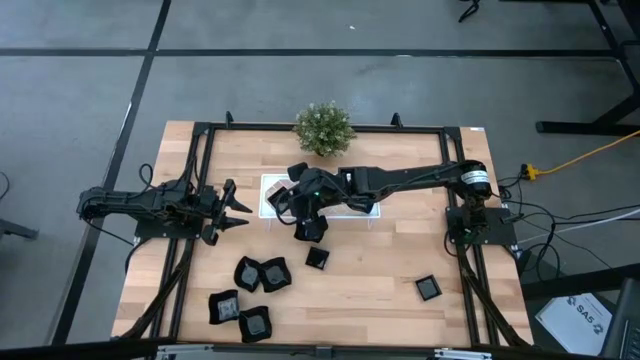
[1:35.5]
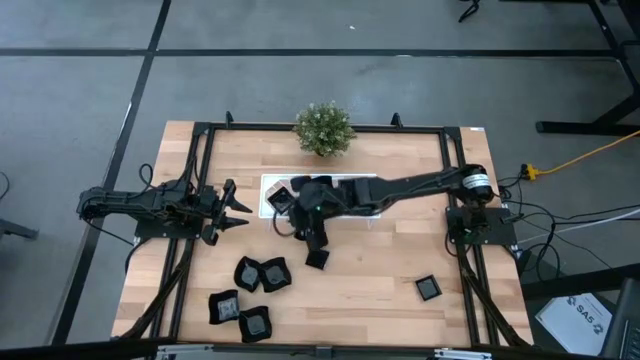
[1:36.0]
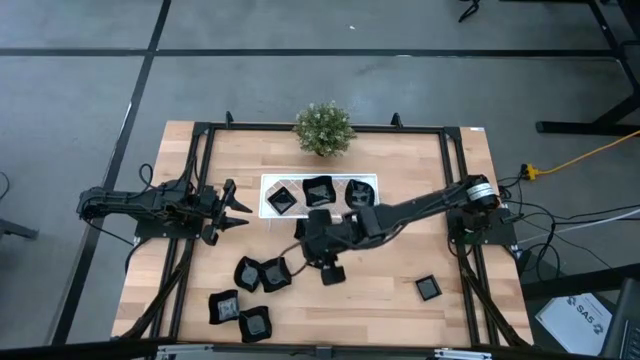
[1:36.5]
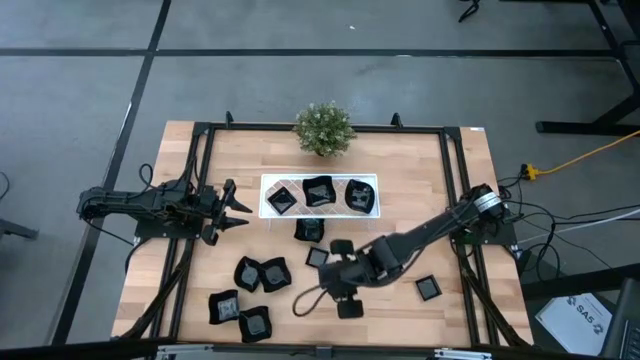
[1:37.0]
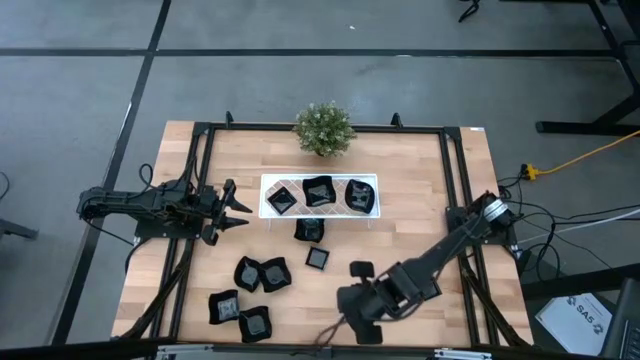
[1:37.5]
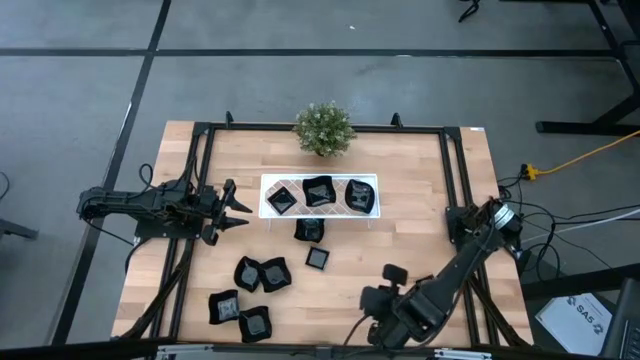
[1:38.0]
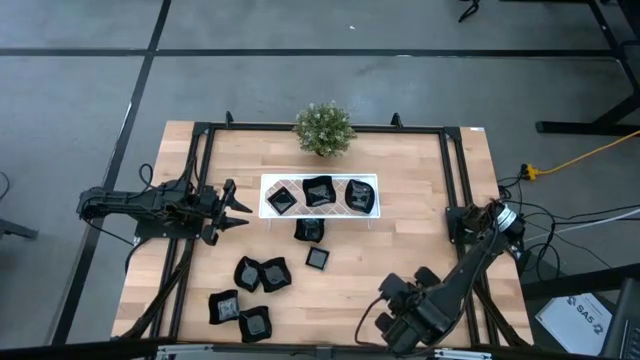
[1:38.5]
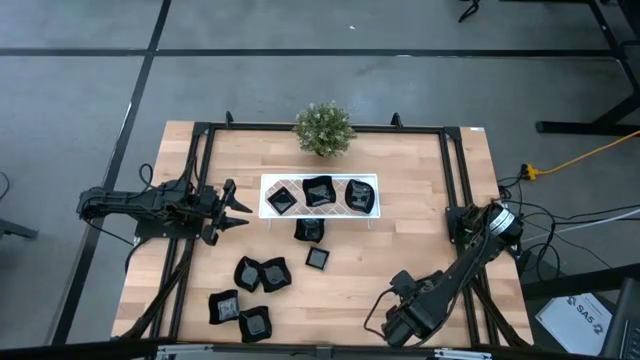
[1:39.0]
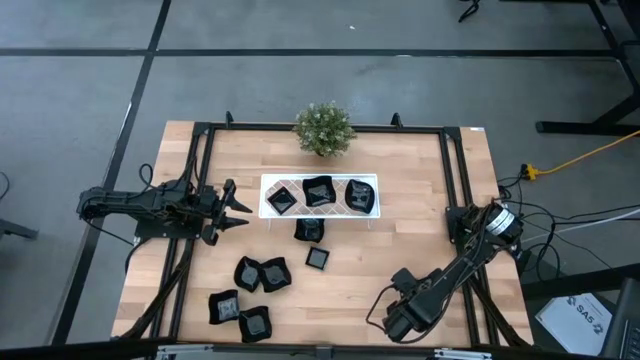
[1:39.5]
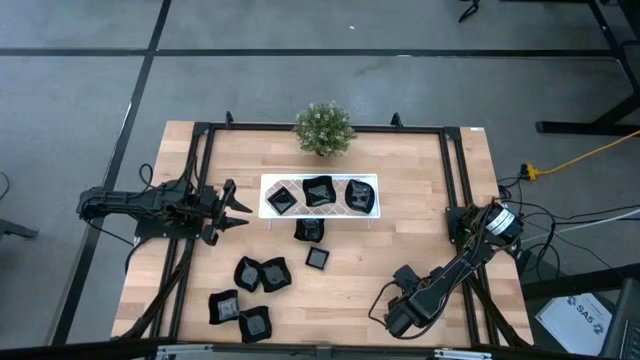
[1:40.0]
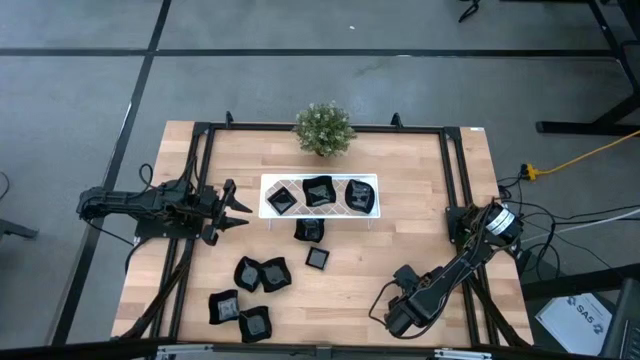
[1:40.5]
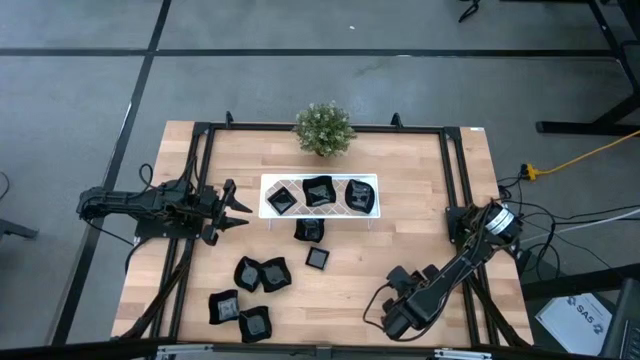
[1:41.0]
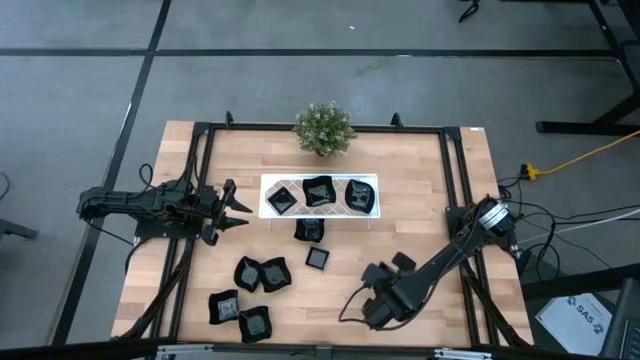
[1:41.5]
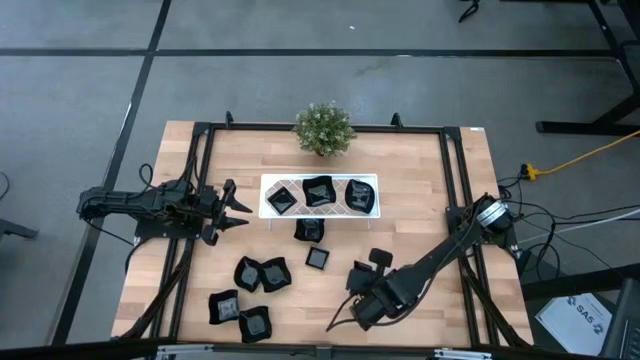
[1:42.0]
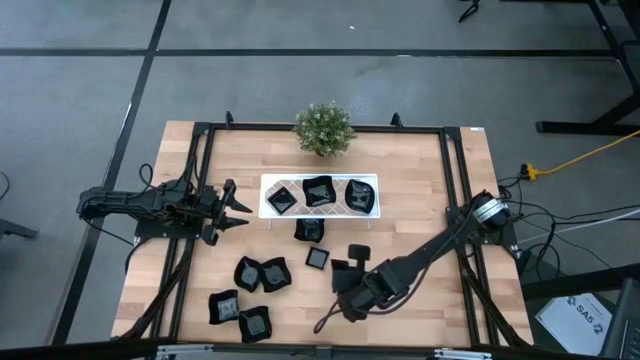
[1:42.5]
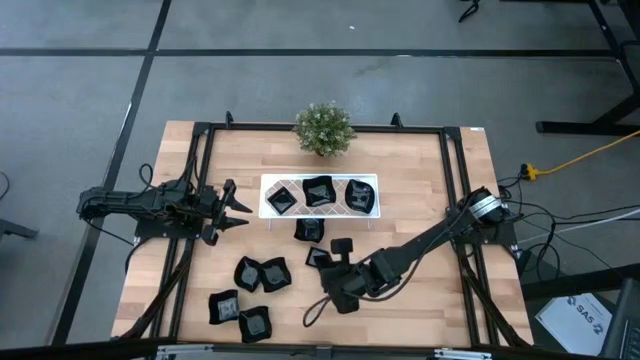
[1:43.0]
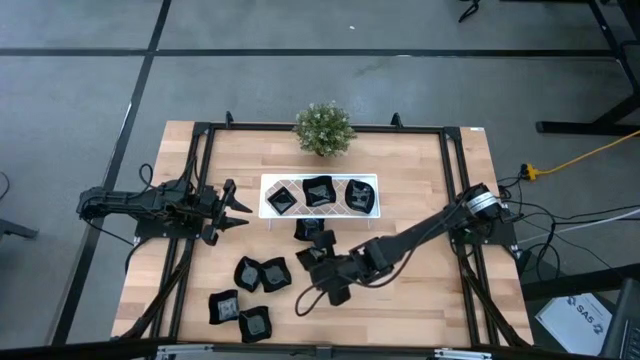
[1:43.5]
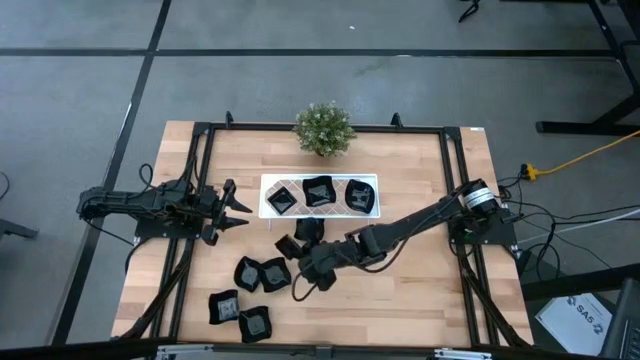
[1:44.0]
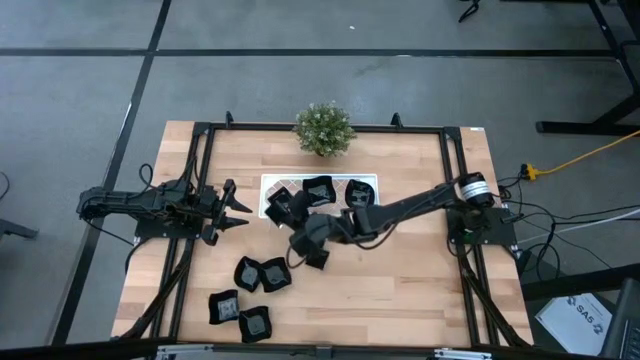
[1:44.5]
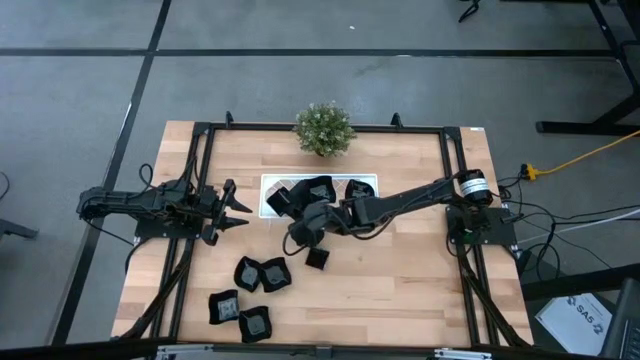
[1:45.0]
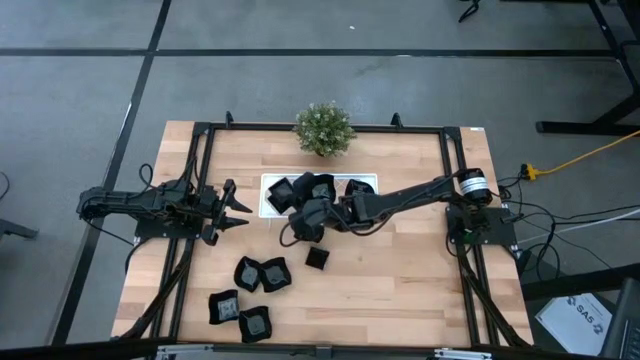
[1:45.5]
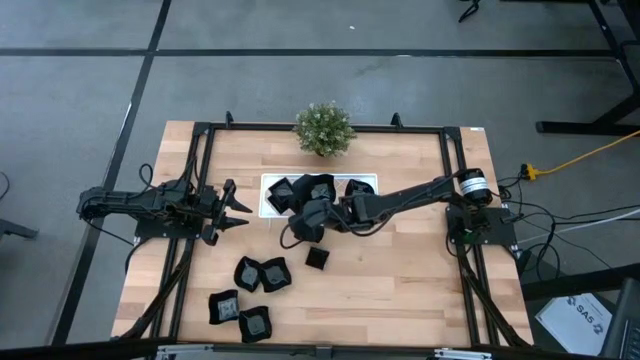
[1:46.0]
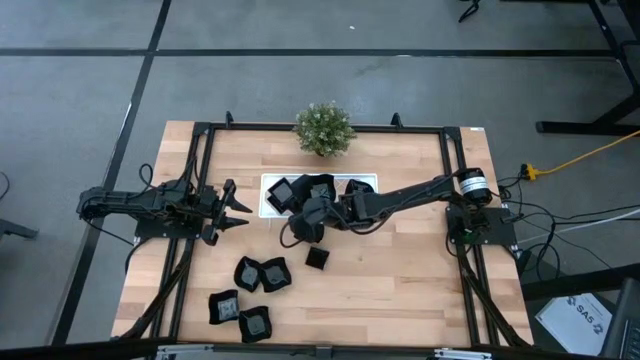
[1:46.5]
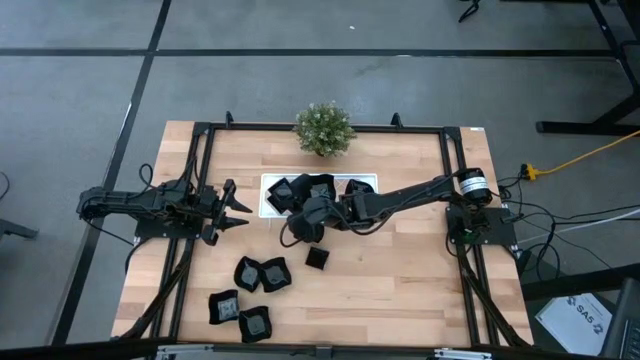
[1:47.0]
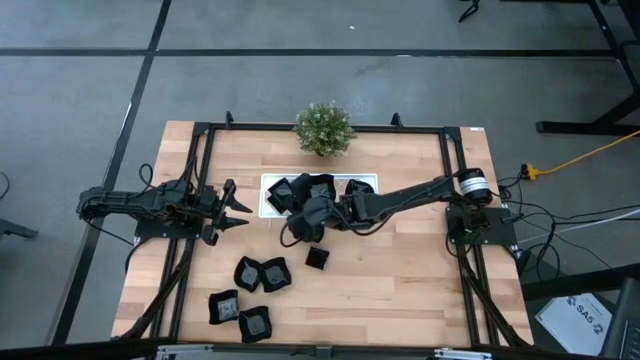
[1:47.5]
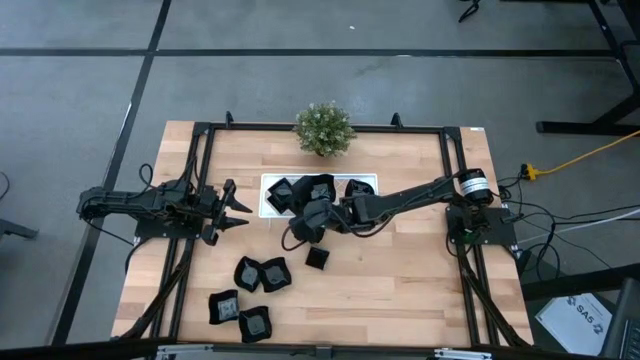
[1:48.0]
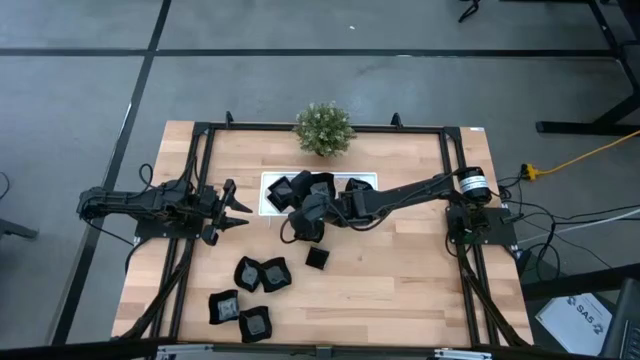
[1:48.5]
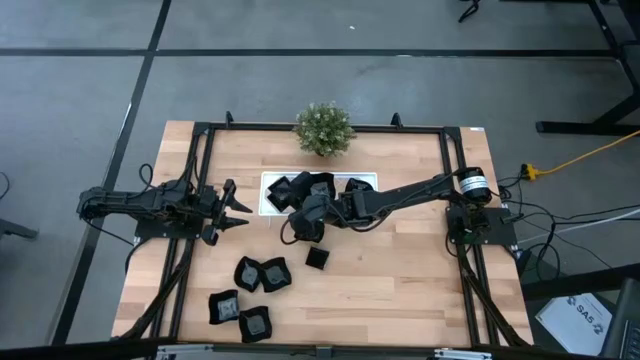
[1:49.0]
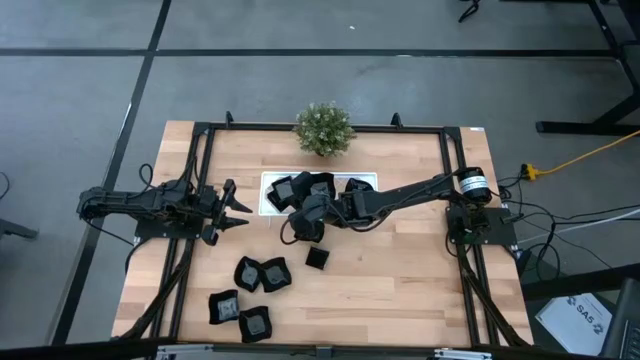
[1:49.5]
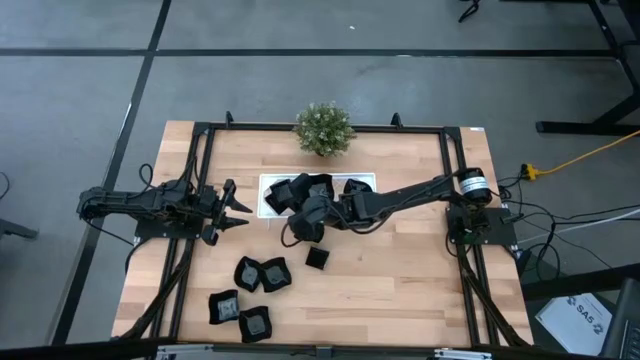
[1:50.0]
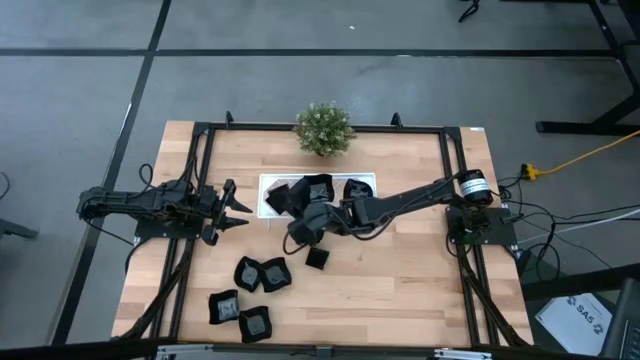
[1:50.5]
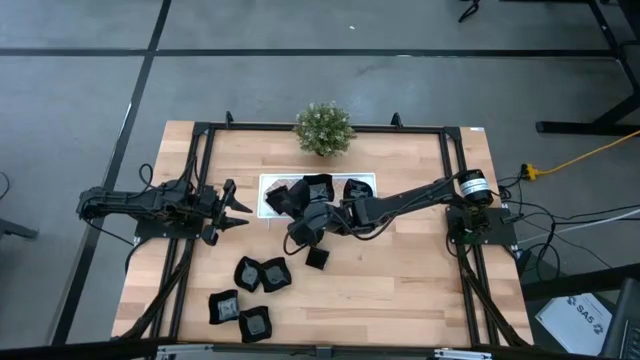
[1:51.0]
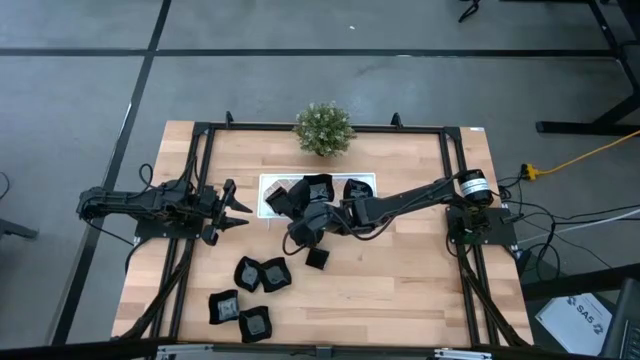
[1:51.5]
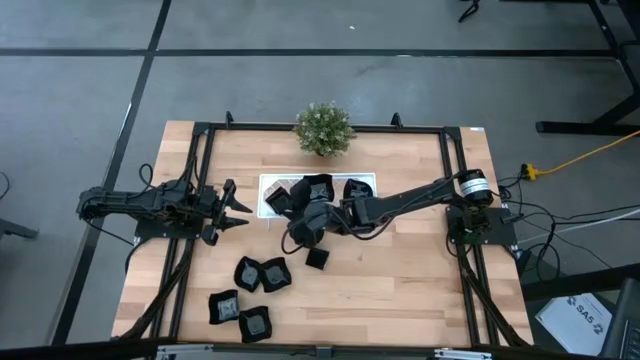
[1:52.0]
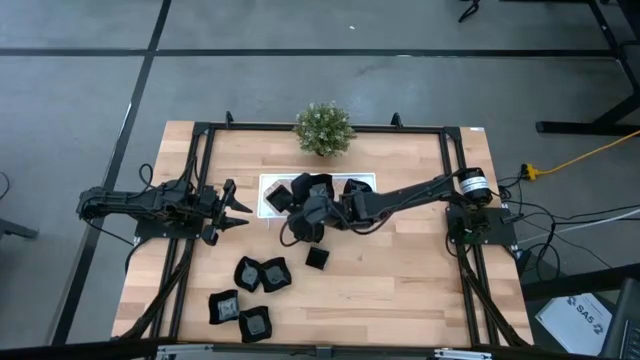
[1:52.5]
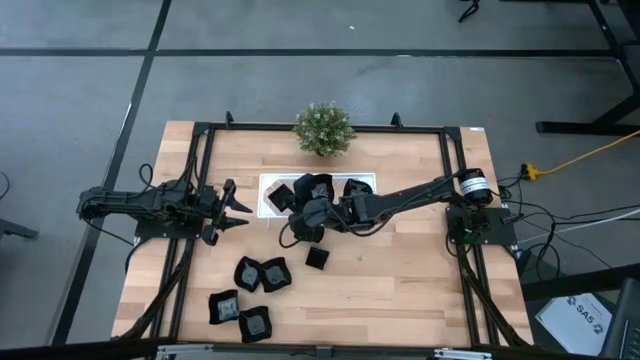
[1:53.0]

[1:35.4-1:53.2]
Task: Pick & Place Mini shaped plates
Stack the black square plate on top of the black square plate on the shelf

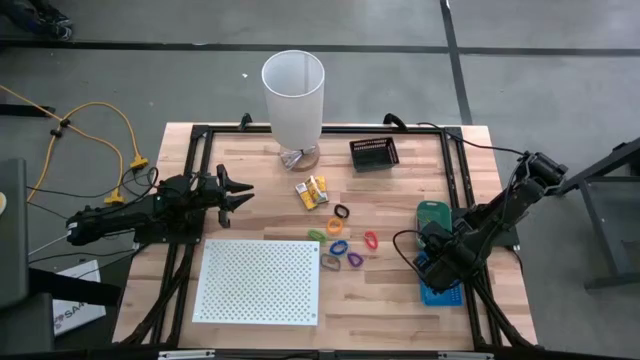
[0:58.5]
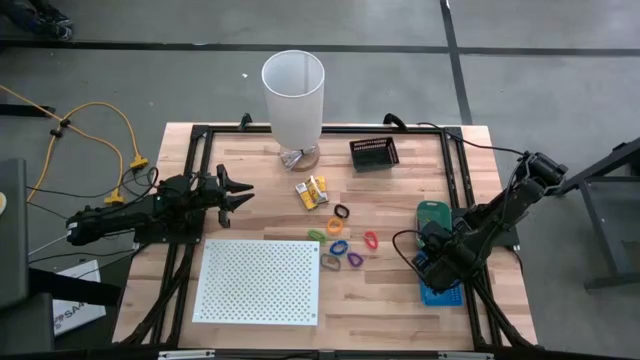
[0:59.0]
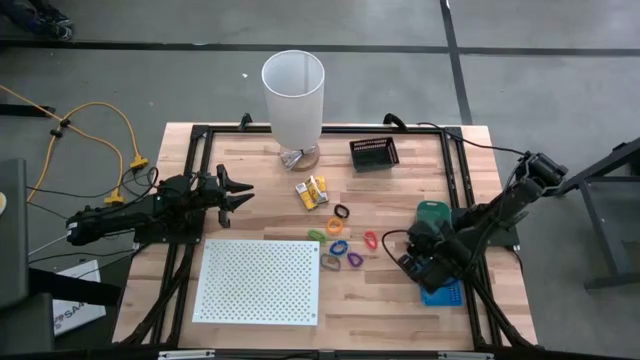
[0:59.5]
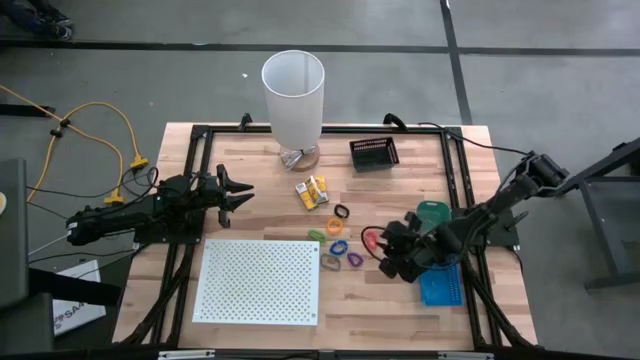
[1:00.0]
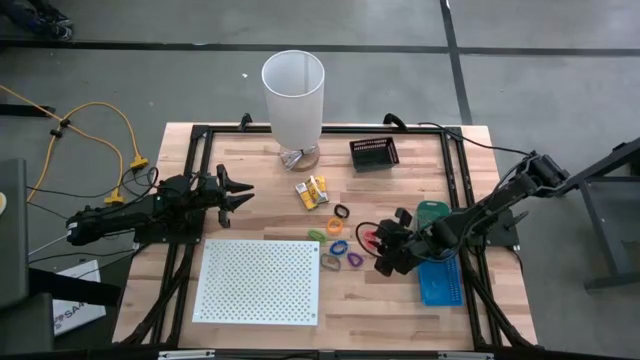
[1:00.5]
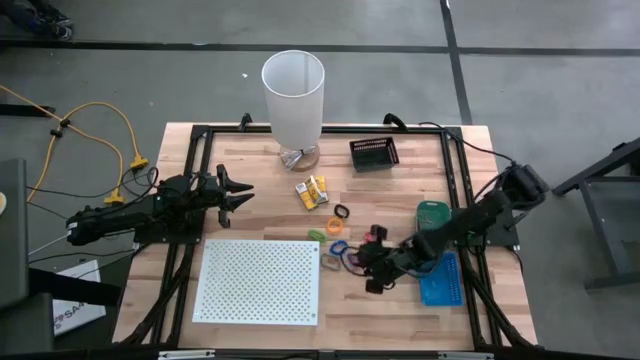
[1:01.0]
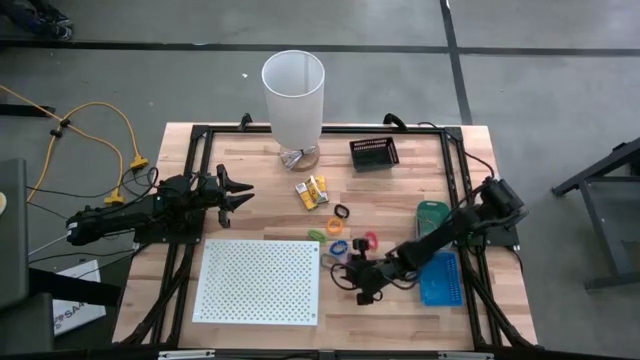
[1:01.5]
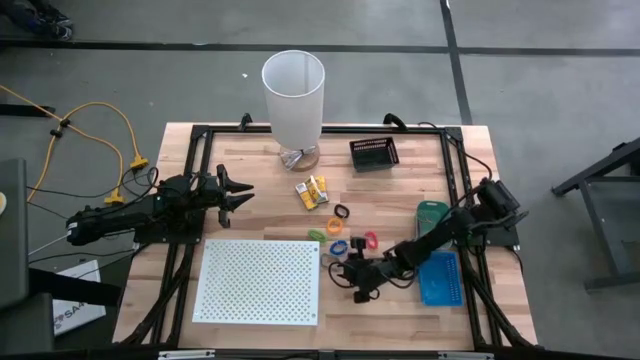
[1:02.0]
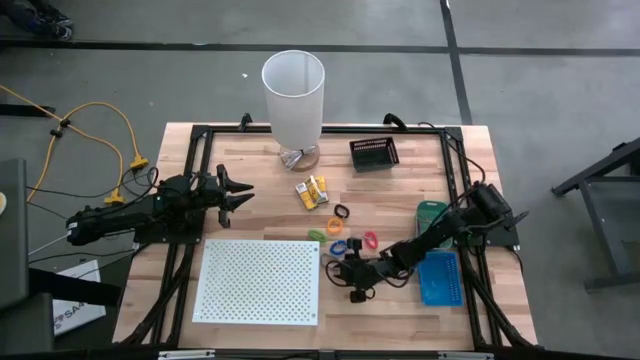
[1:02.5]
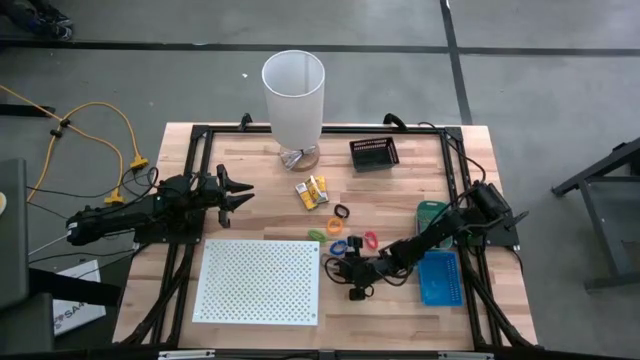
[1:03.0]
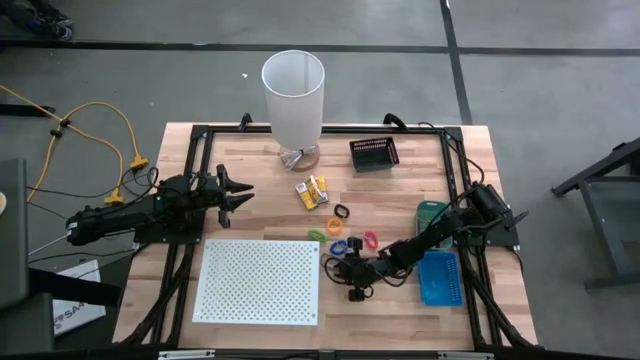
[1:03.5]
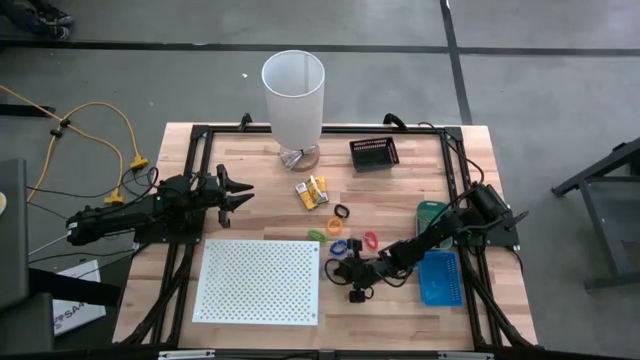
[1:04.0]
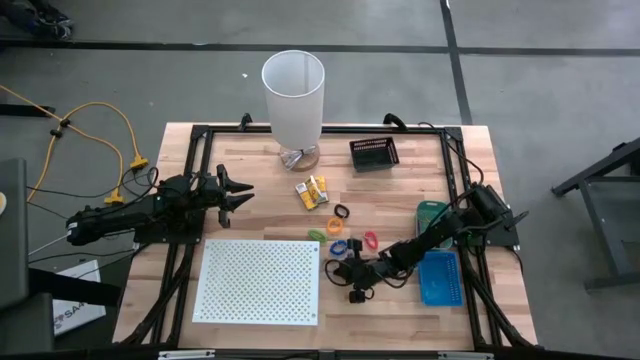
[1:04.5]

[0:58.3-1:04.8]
Task: Pick & Place Office Desk Supplies
Put the blue rubber bands into the green bin
